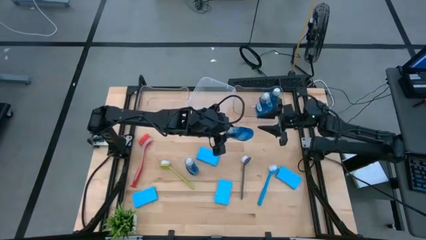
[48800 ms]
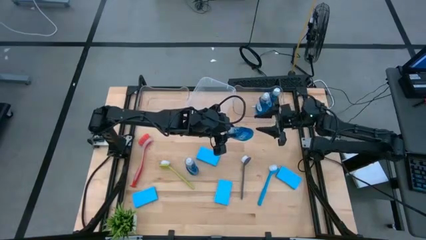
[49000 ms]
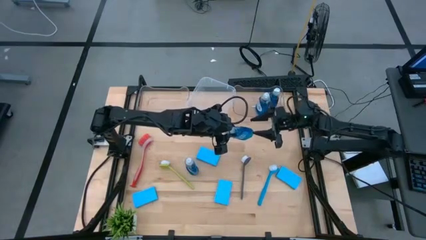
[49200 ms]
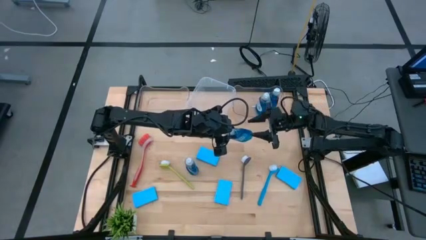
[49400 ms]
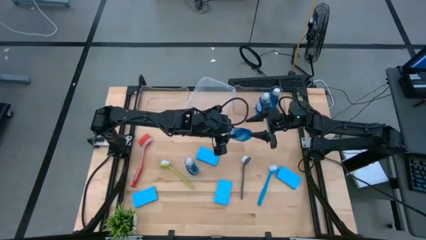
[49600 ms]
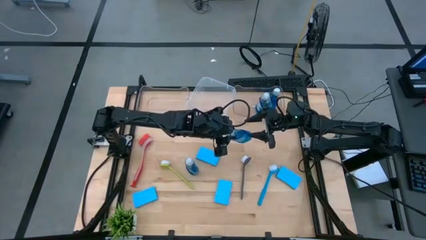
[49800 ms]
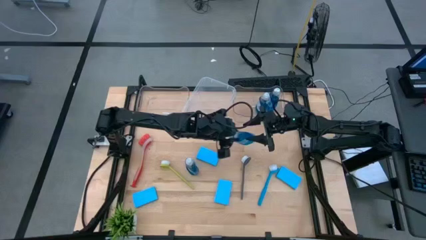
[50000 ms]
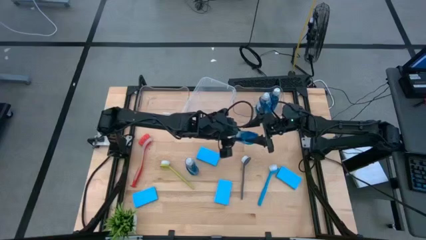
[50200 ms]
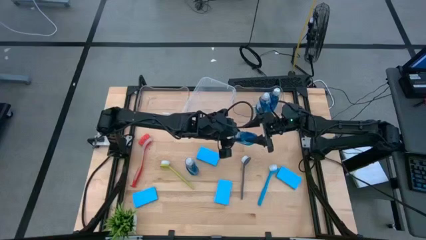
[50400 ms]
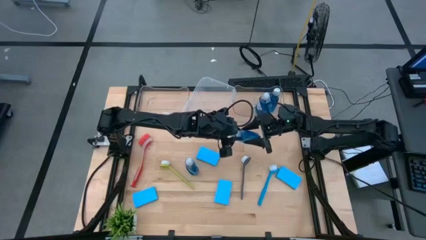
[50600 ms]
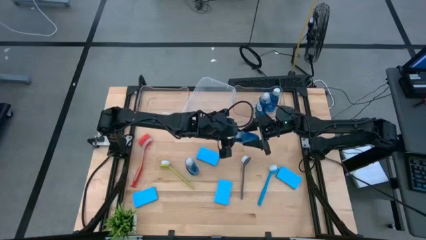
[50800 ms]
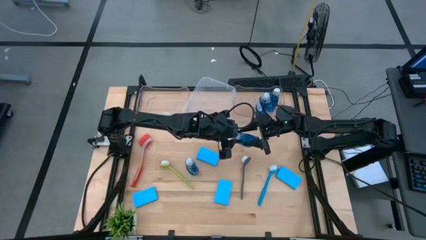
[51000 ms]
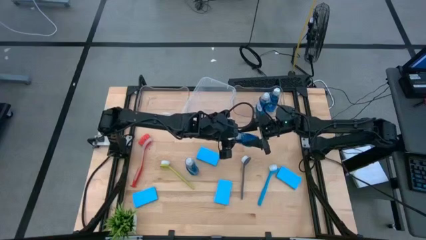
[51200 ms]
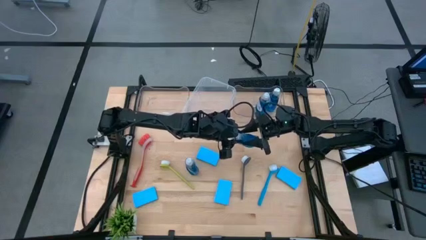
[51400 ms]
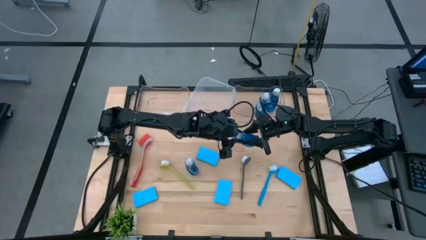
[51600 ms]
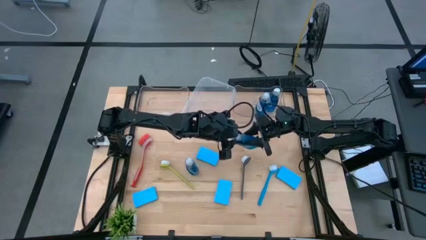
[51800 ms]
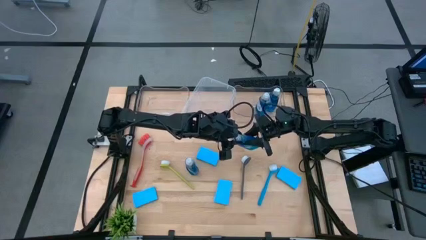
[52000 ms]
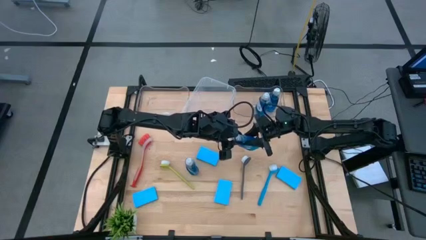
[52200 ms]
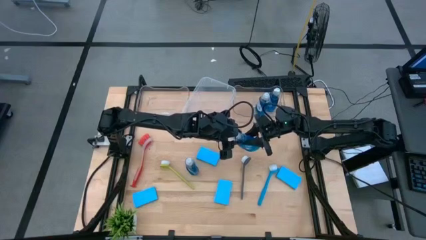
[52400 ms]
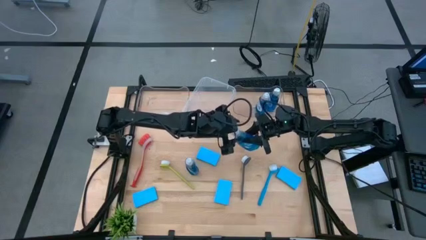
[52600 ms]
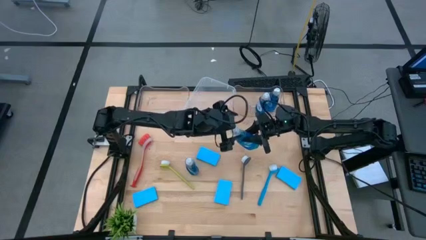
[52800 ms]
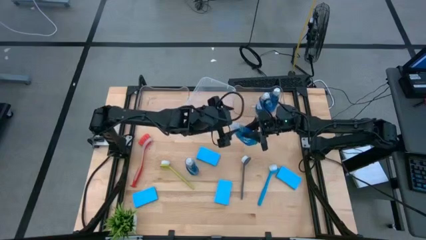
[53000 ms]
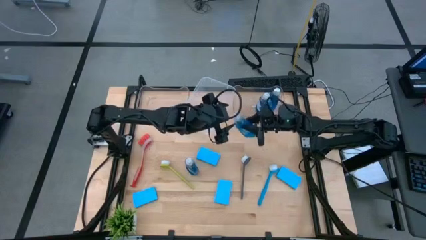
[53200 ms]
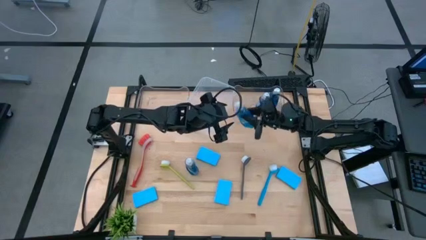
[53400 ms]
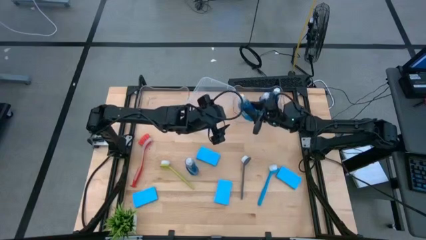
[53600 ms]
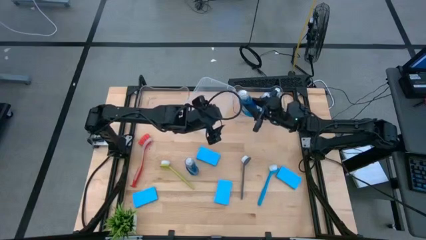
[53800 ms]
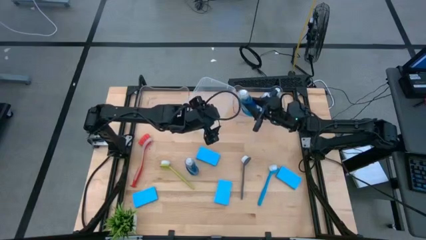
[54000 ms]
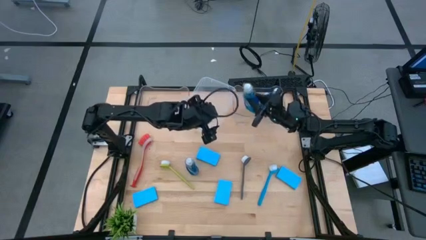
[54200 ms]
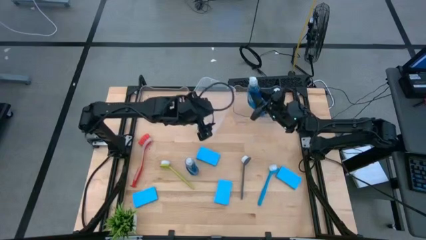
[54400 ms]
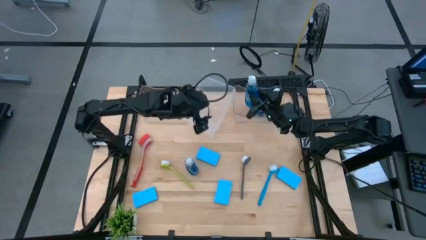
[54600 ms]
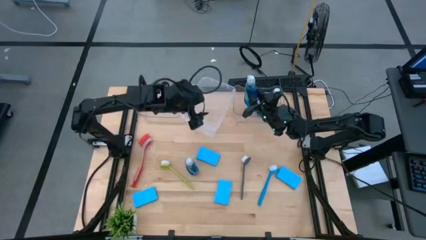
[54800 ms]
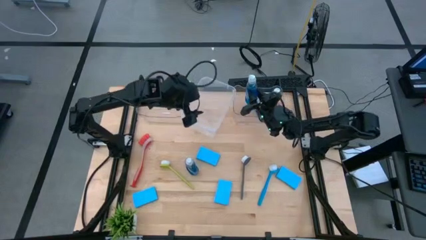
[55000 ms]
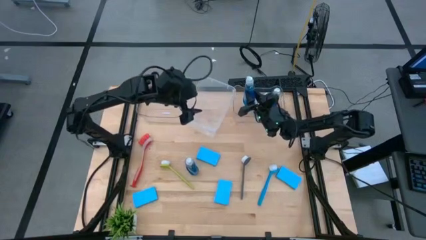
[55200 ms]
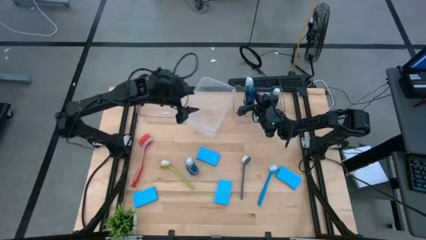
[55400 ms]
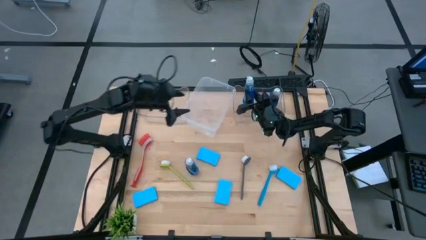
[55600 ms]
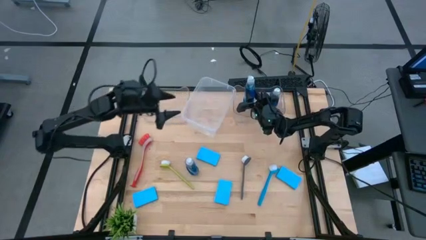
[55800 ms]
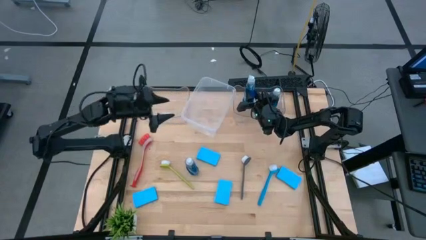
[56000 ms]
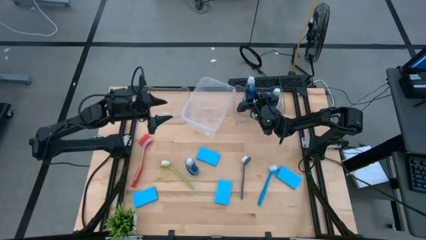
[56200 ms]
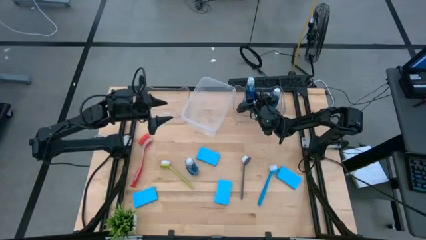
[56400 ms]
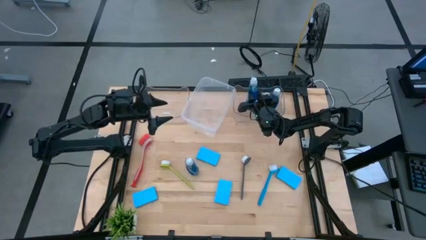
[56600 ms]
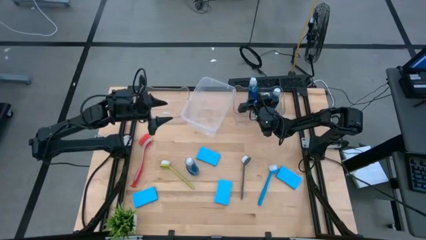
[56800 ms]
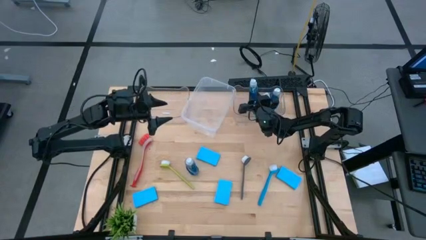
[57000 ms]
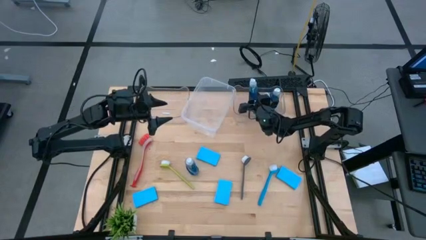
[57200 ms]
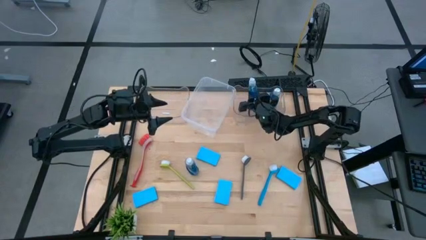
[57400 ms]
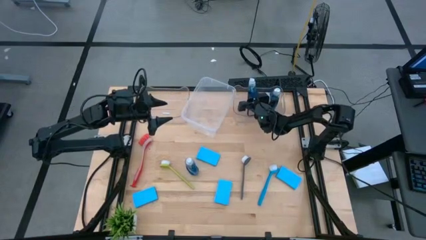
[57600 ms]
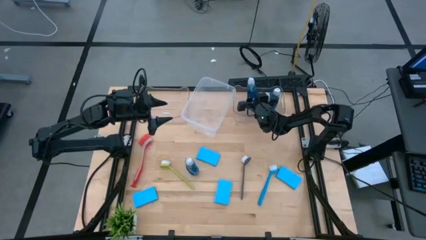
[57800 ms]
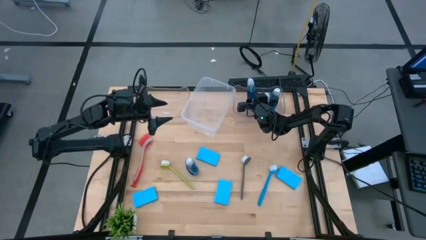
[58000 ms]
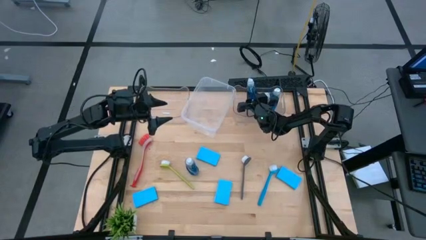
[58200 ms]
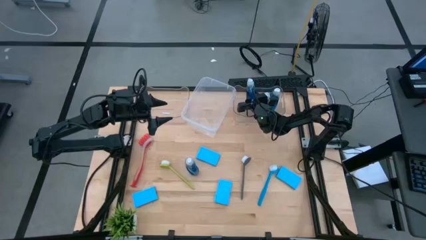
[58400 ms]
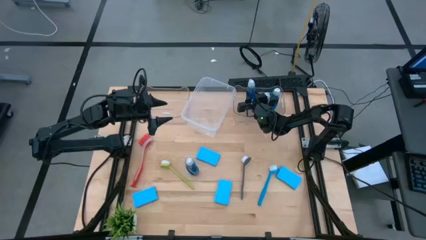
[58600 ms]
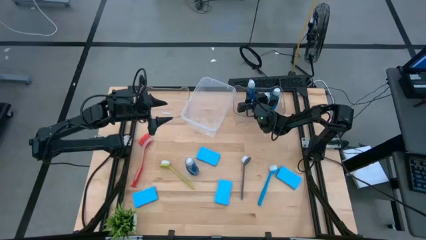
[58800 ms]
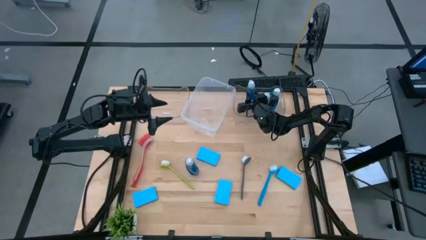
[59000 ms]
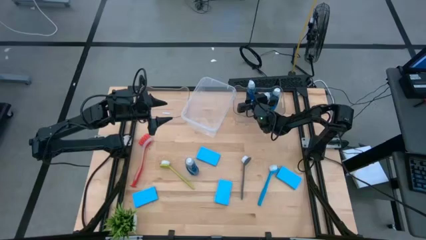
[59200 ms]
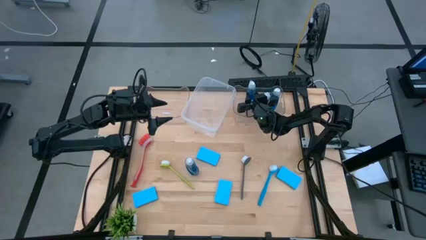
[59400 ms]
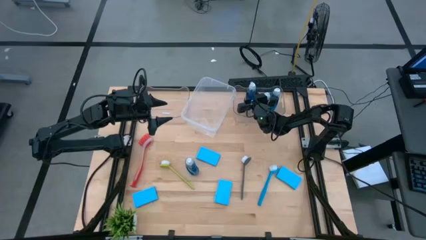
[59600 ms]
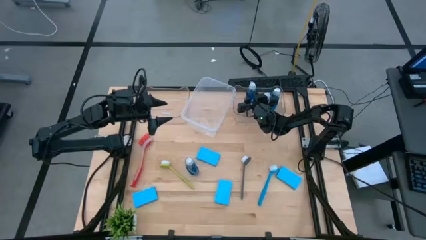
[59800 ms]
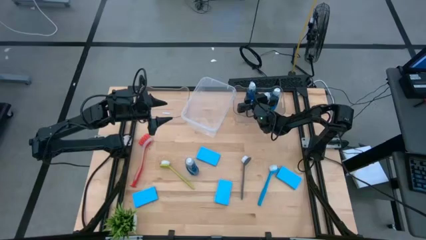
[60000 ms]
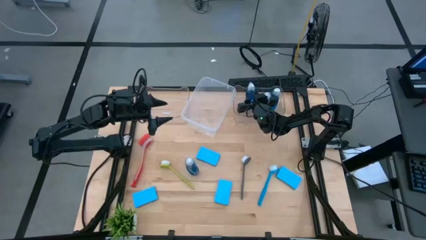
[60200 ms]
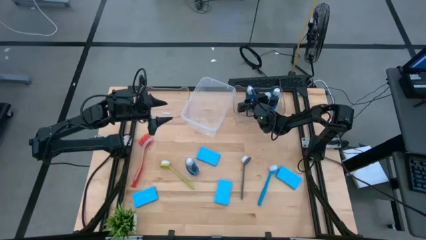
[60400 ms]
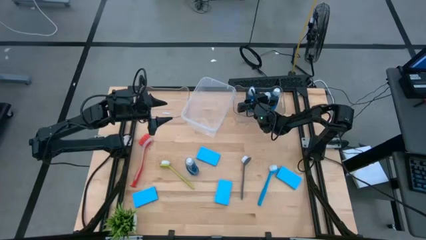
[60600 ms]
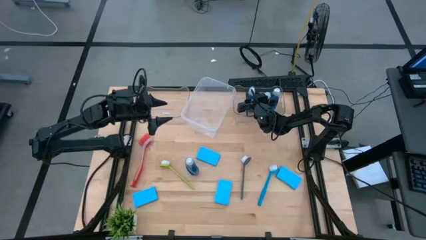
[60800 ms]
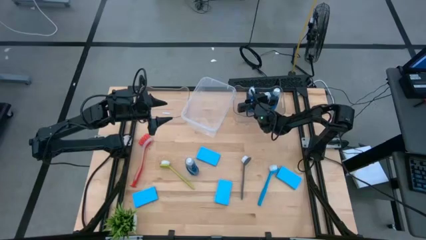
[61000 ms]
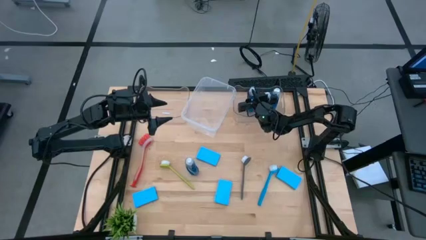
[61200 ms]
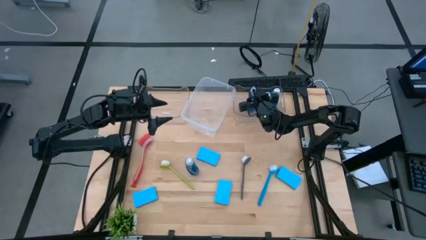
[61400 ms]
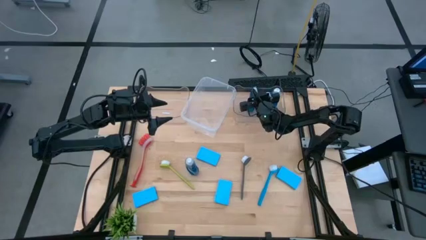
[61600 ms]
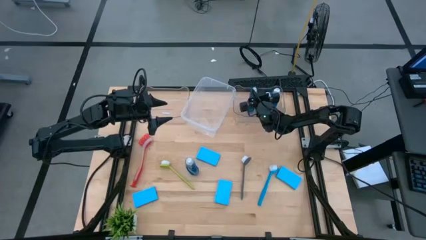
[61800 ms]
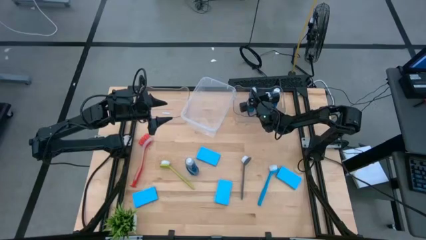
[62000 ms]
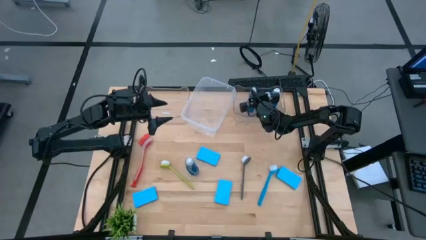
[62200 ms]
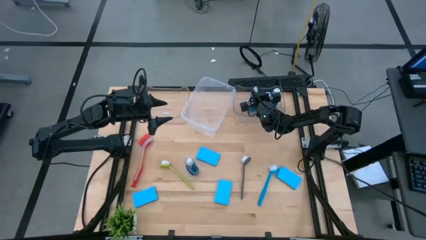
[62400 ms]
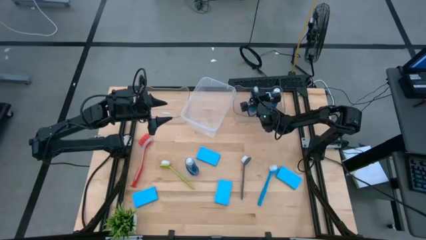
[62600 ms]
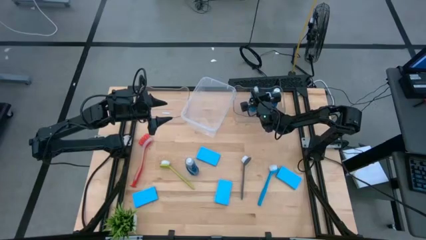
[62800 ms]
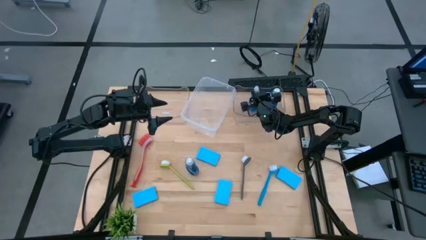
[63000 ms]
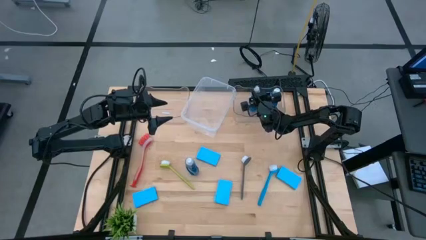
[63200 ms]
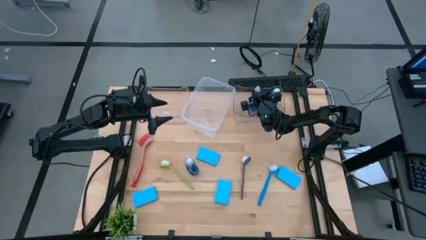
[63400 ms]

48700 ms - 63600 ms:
Task: Pick & Place Kitchen Sink Supplies
Put the blue dish soap into the right transparent bin

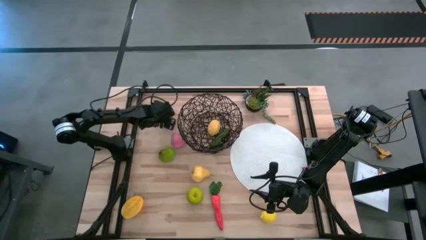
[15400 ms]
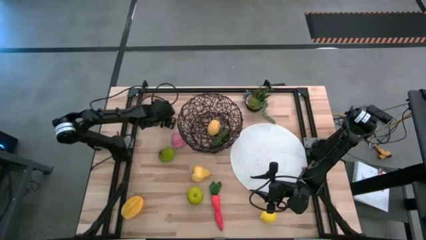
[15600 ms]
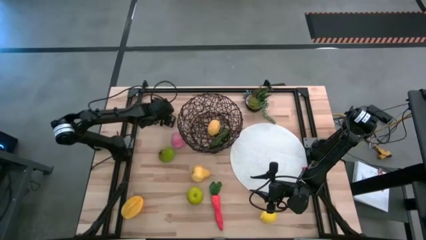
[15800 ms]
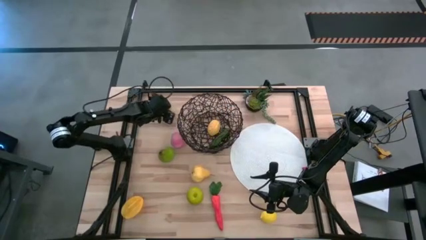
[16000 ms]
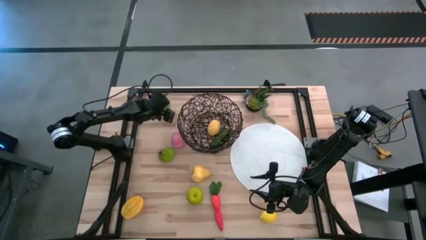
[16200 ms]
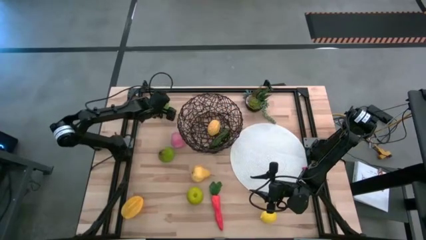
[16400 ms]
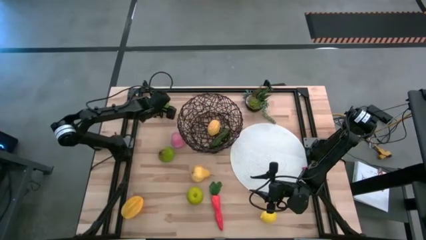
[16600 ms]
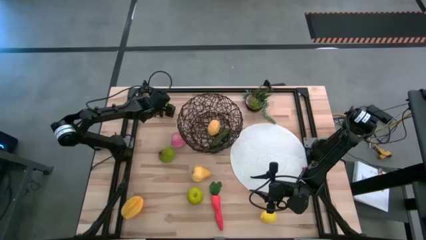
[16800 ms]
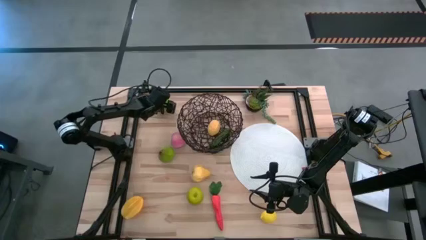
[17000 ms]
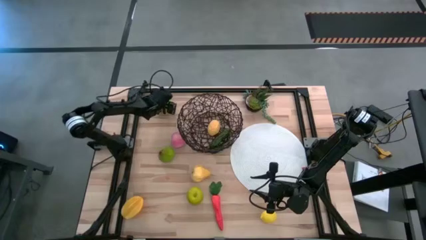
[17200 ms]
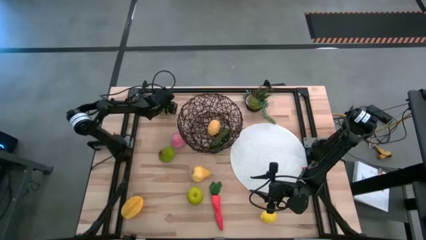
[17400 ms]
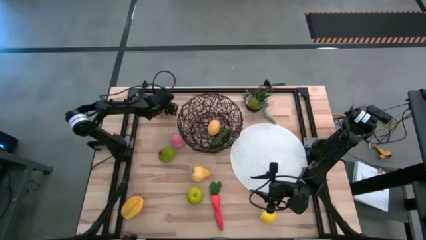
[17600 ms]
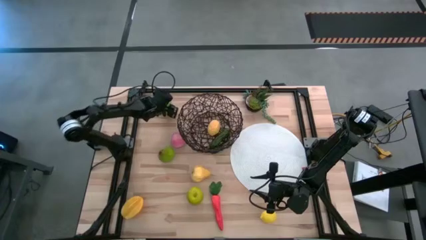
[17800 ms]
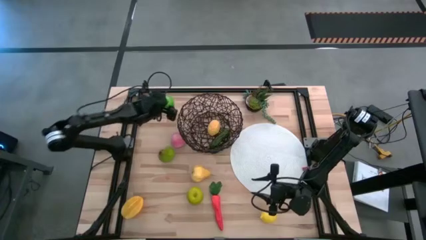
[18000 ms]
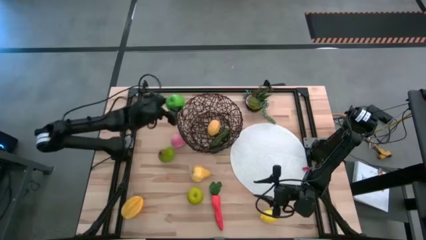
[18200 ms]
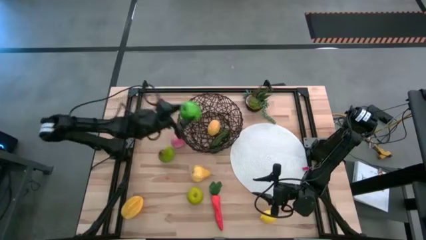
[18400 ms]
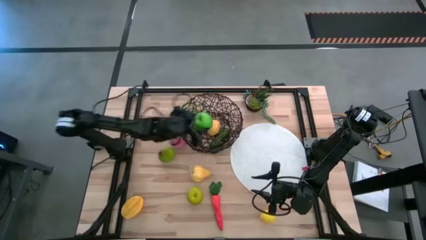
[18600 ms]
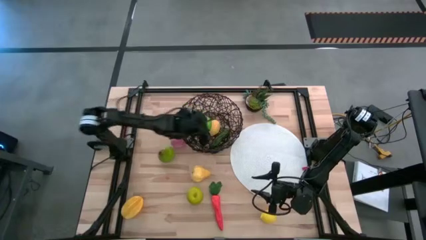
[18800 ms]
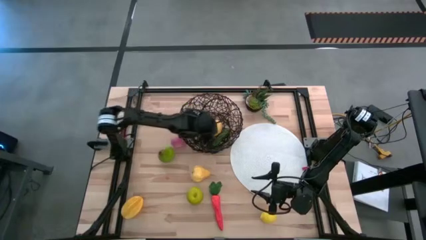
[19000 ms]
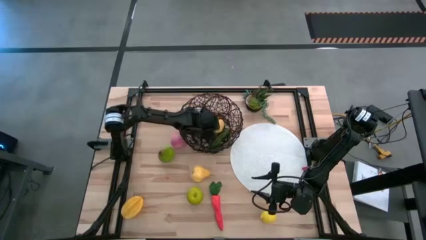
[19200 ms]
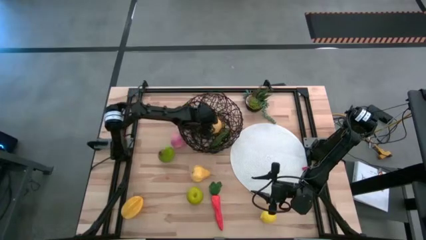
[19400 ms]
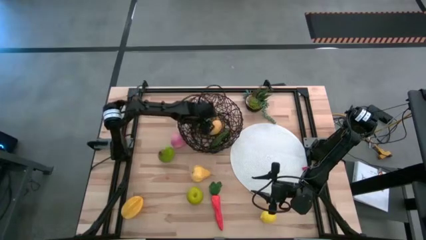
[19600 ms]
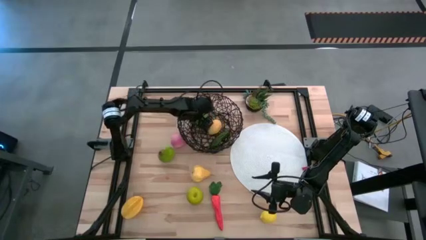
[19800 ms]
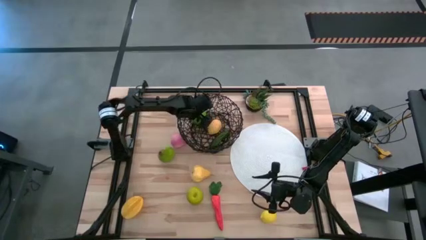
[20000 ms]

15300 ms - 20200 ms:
Task: Build produce basket
Put the top green apple into the wire basket
